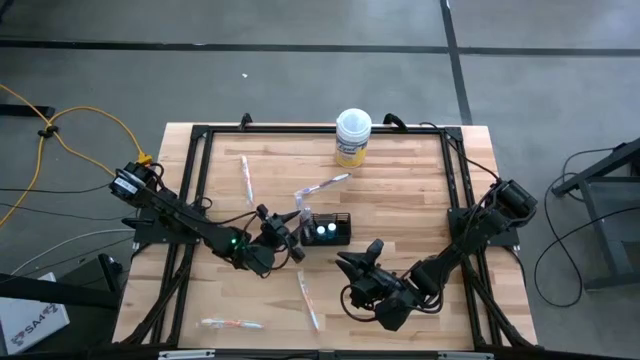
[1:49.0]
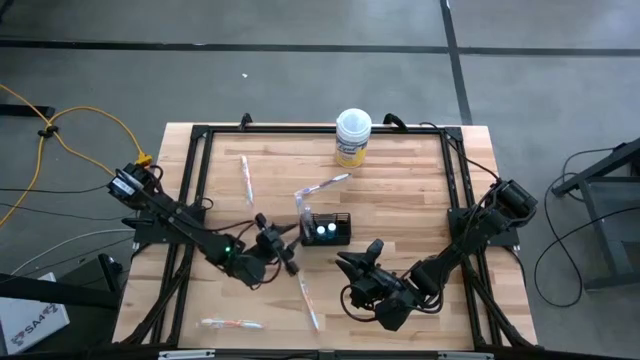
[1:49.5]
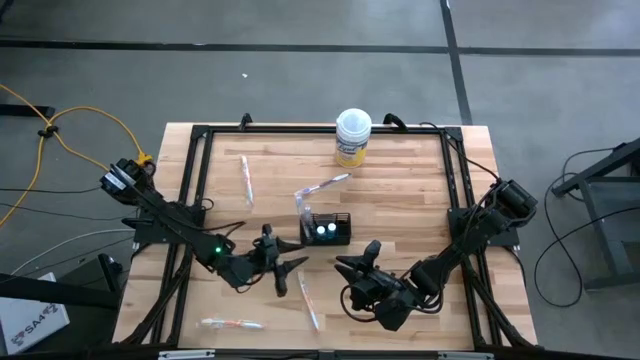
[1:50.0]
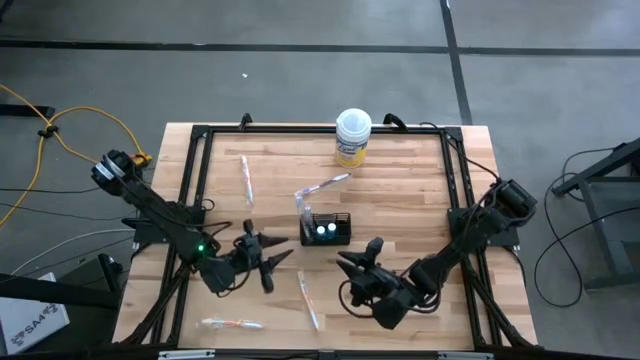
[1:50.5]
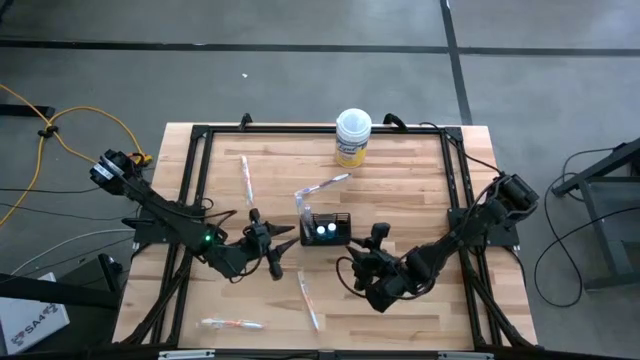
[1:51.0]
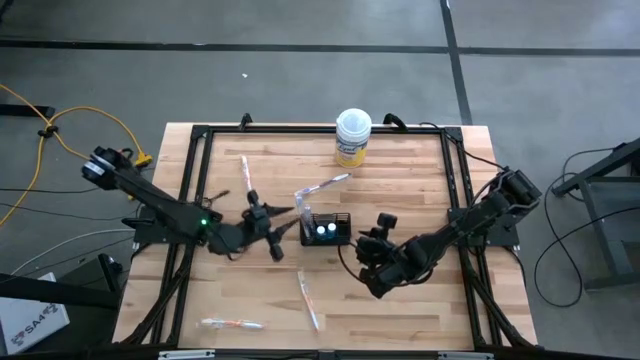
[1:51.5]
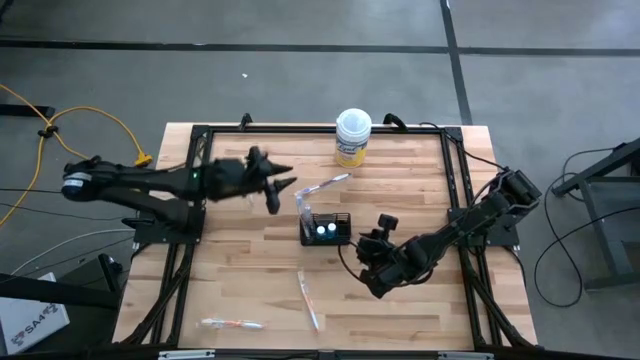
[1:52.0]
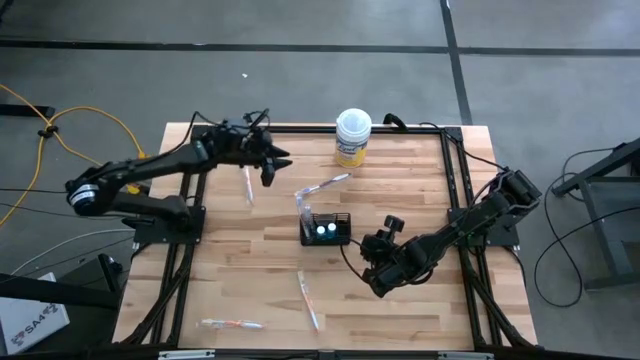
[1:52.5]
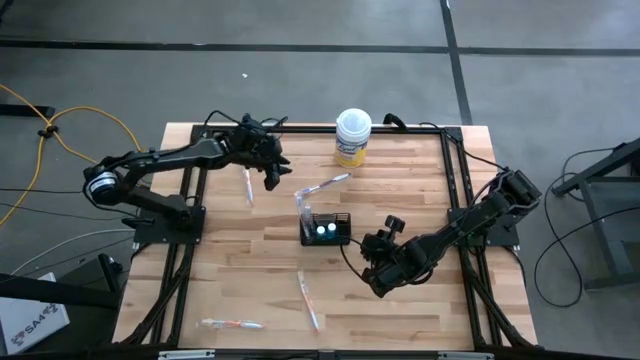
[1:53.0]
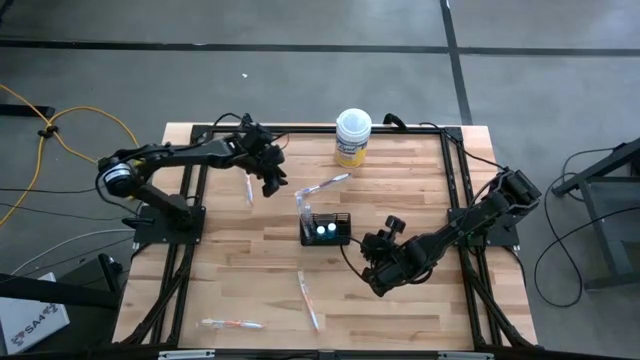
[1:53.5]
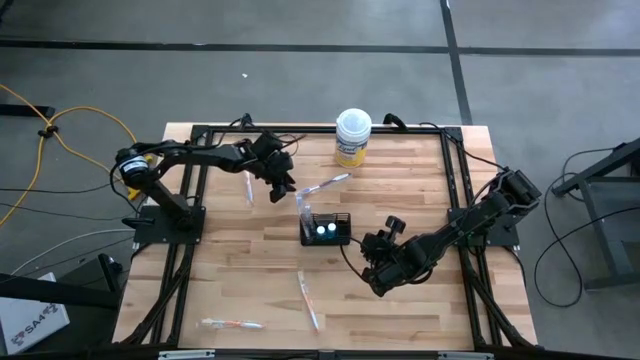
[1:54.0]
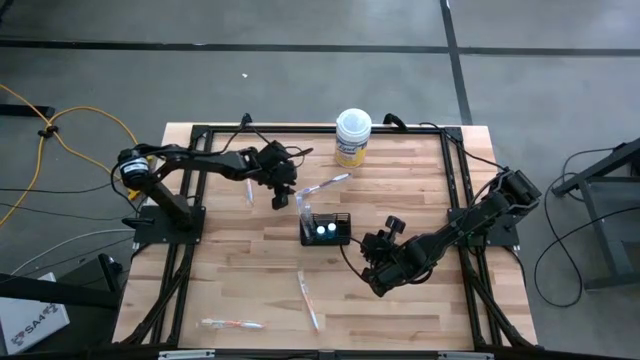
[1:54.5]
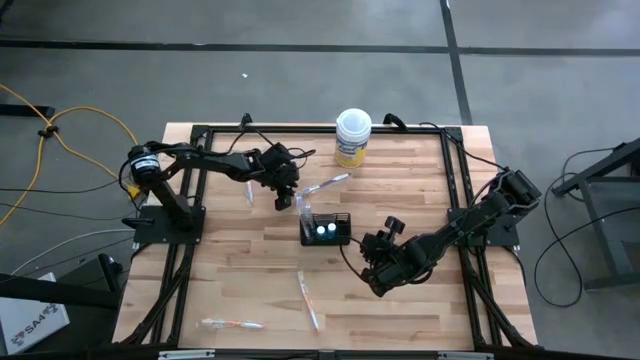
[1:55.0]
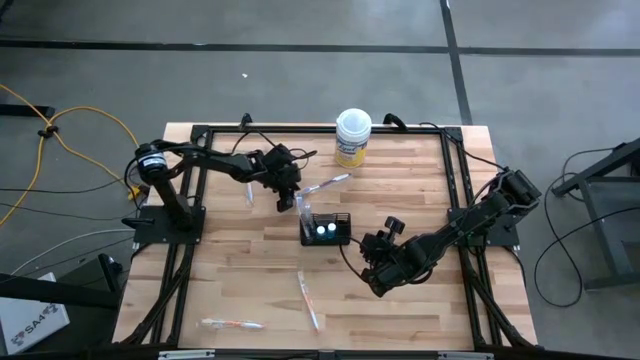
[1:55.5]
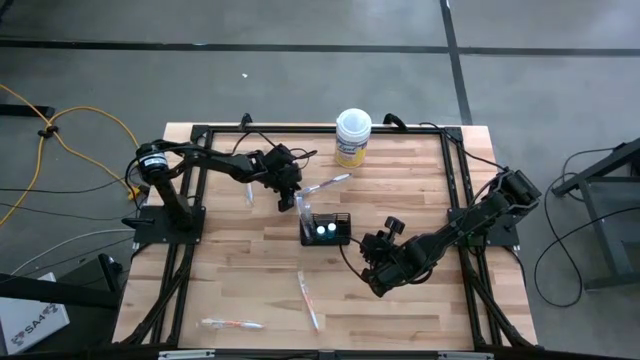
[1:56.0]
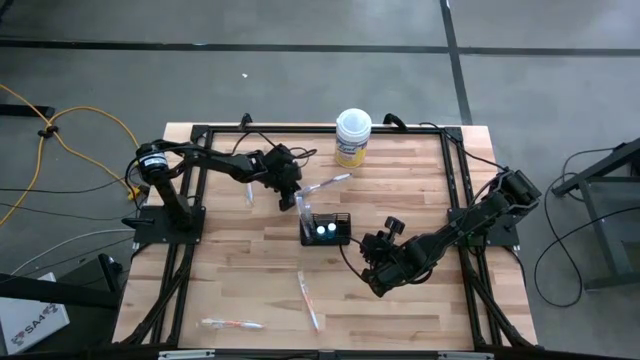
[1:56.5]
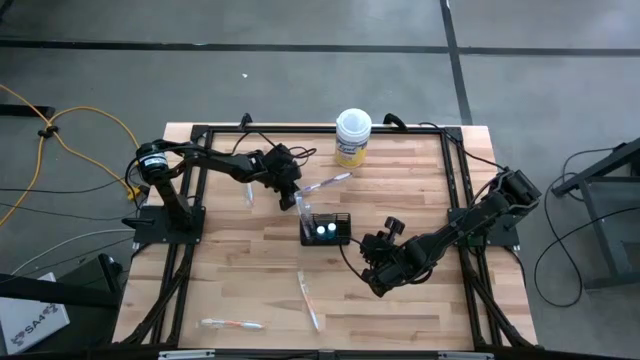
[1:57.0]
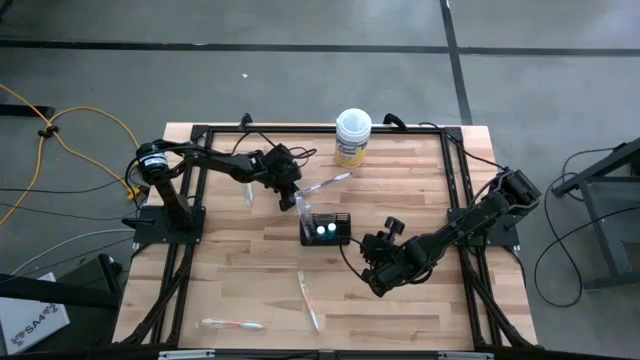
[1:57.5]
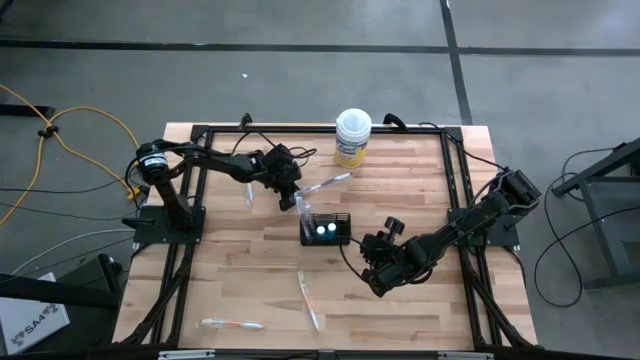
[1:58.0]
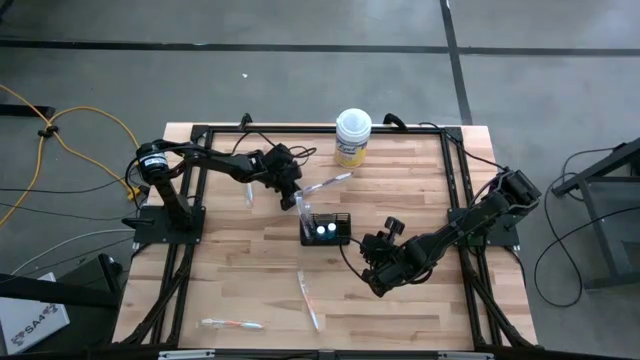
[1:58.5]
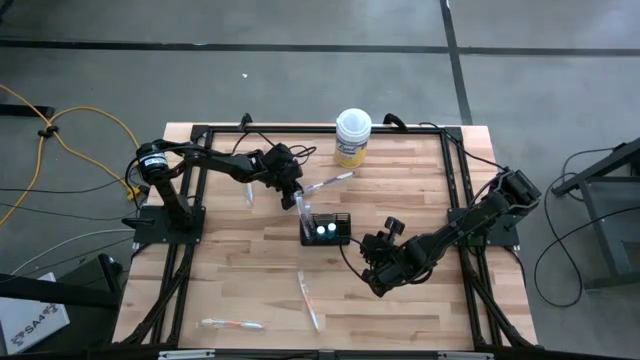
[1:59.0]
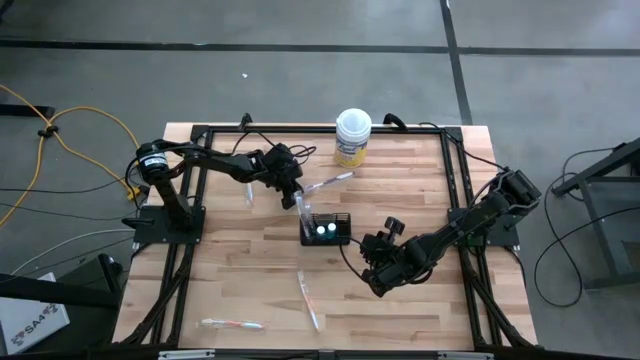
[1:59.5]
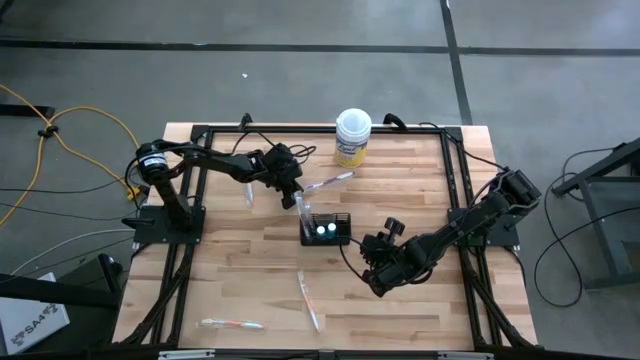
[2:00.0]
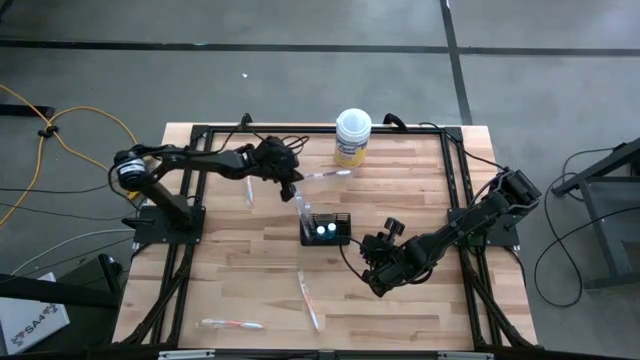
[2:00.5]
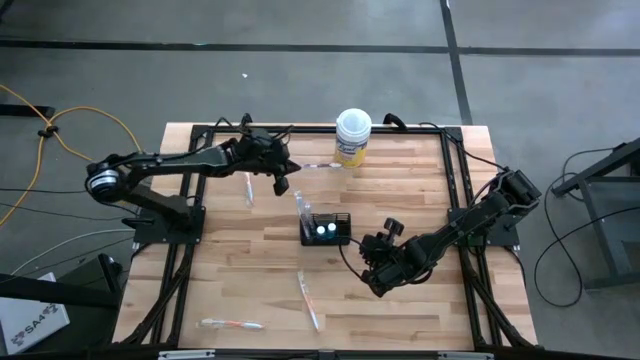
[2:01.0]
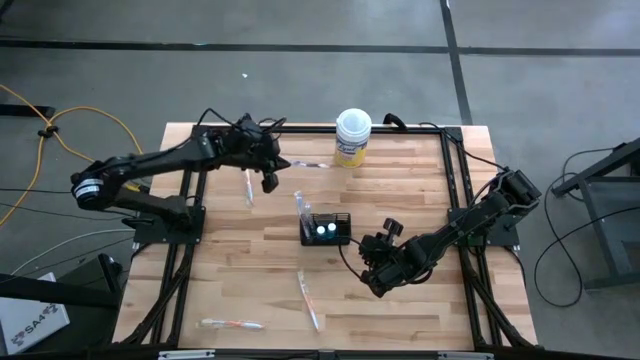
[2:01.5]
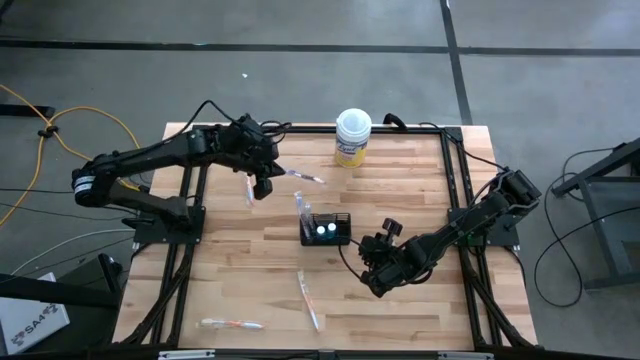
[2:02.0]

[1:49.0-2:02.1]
Task: Pick & Place toothbrushing station
Put the purple toothbrush into the wire organizer

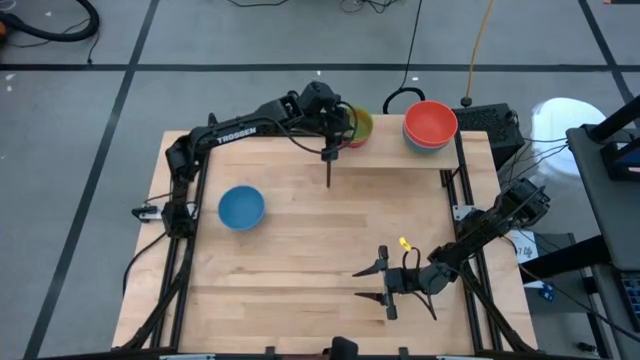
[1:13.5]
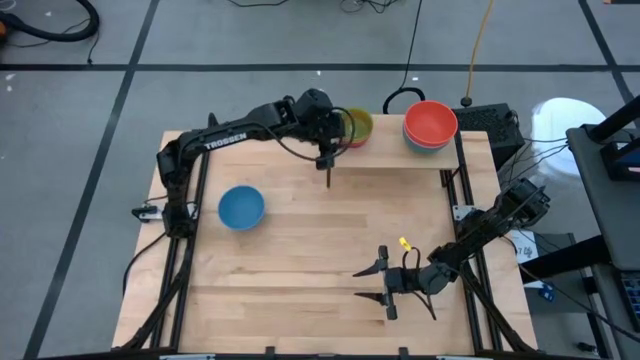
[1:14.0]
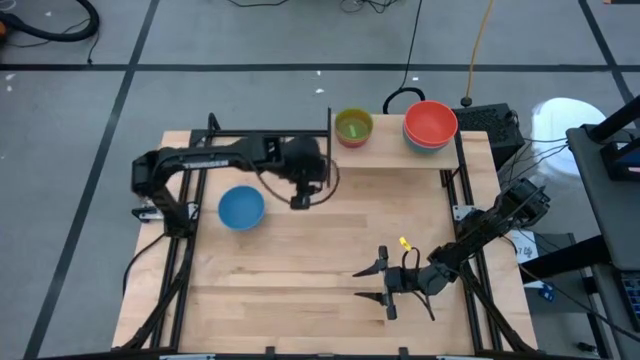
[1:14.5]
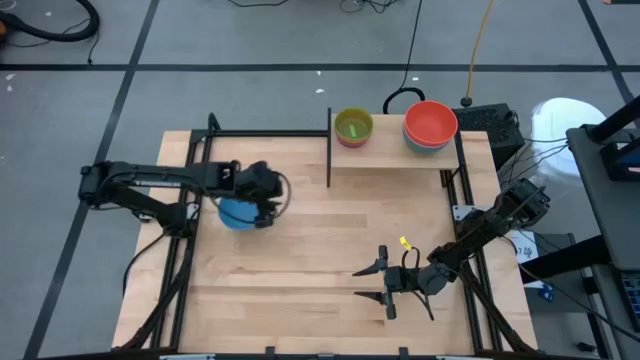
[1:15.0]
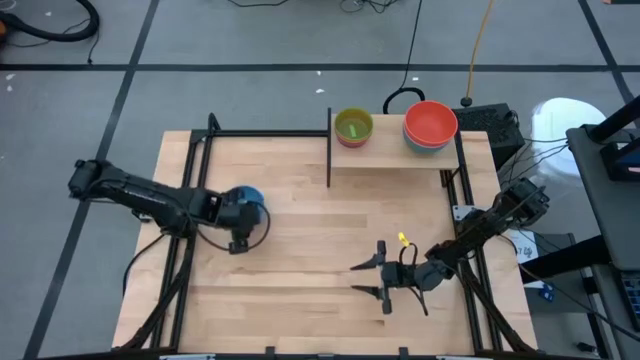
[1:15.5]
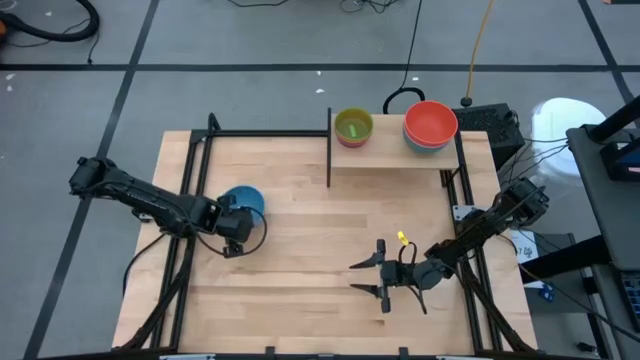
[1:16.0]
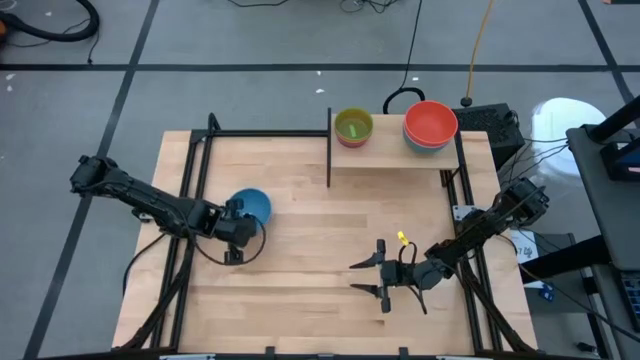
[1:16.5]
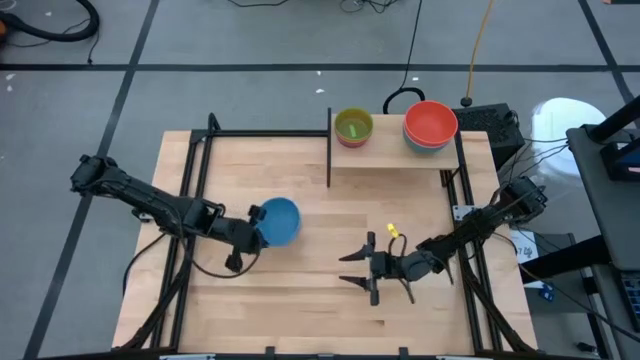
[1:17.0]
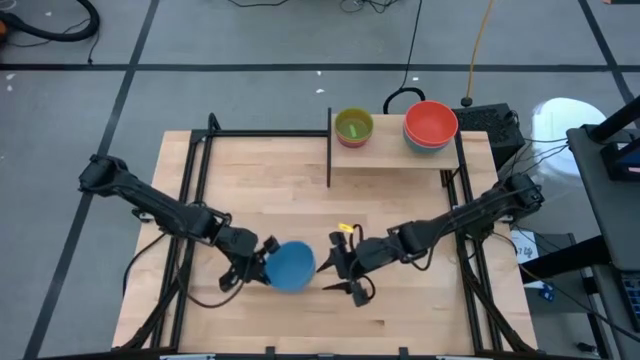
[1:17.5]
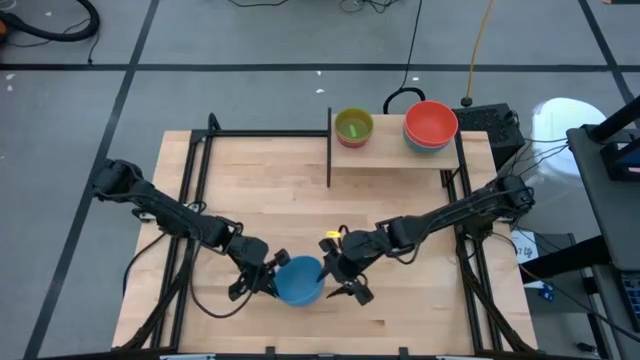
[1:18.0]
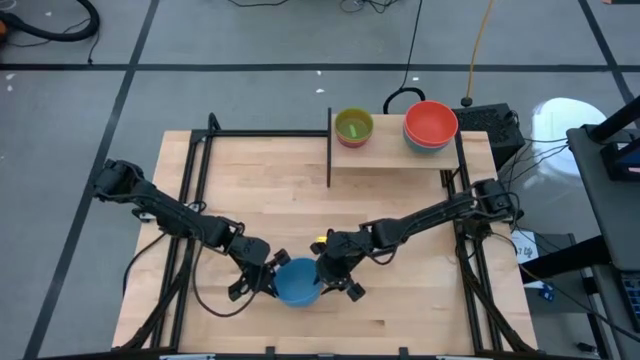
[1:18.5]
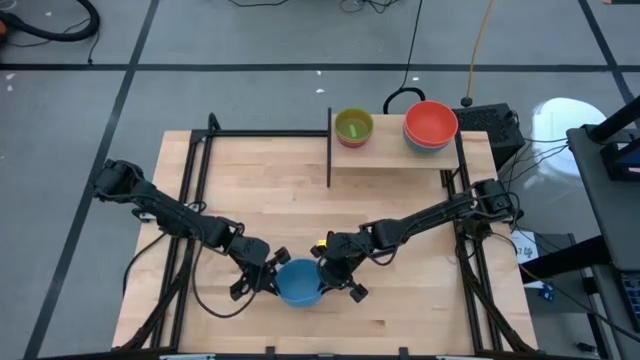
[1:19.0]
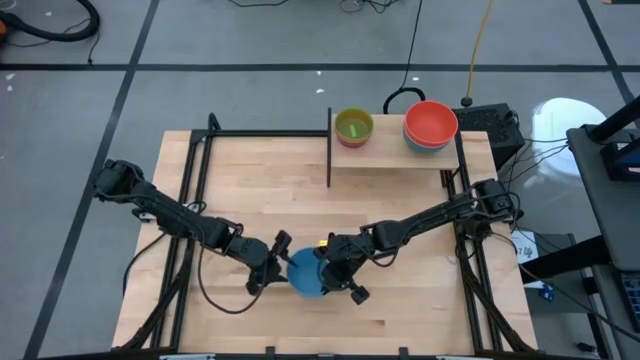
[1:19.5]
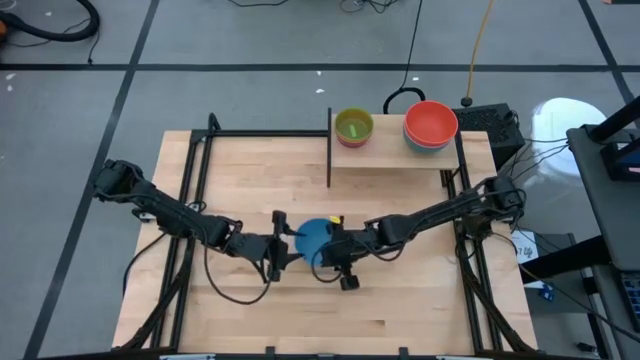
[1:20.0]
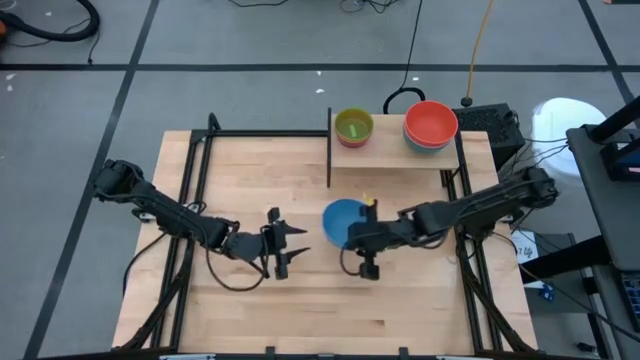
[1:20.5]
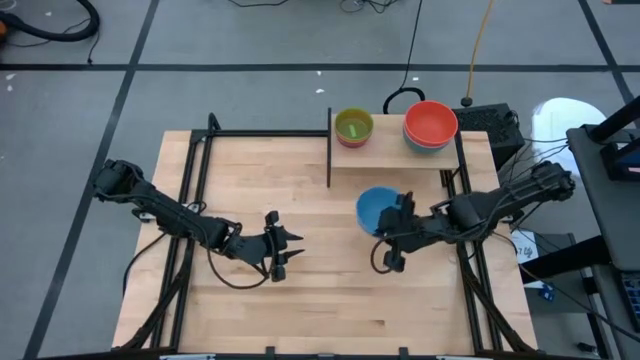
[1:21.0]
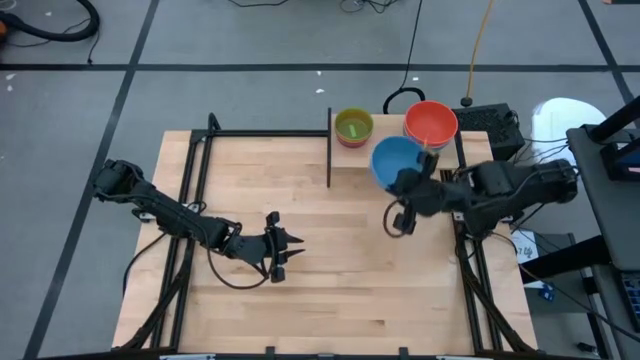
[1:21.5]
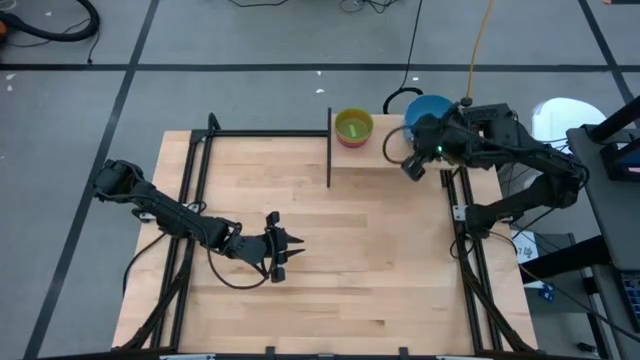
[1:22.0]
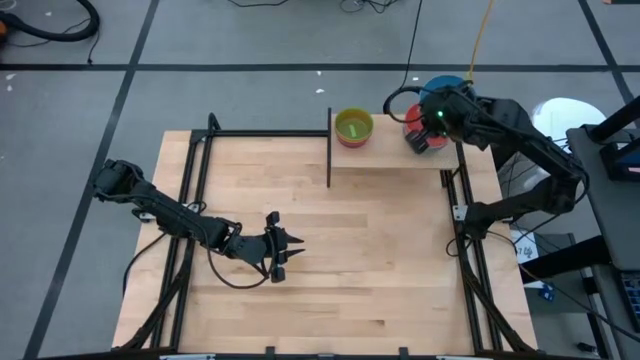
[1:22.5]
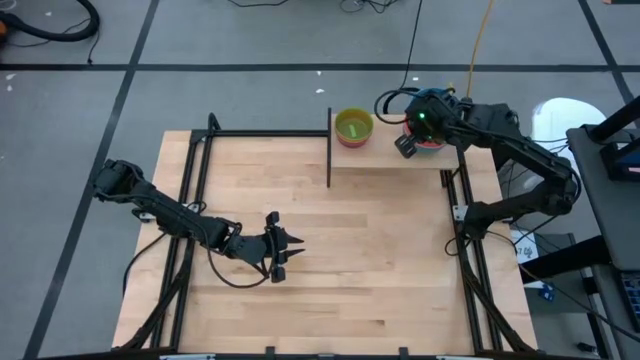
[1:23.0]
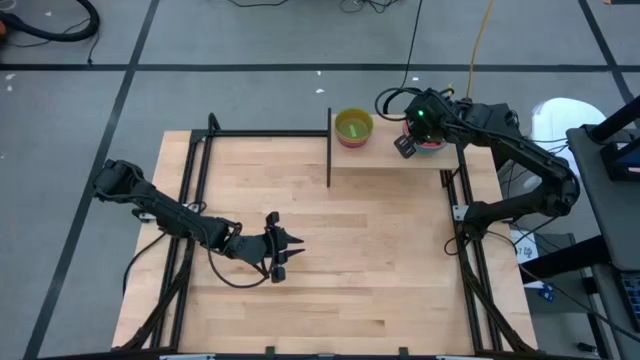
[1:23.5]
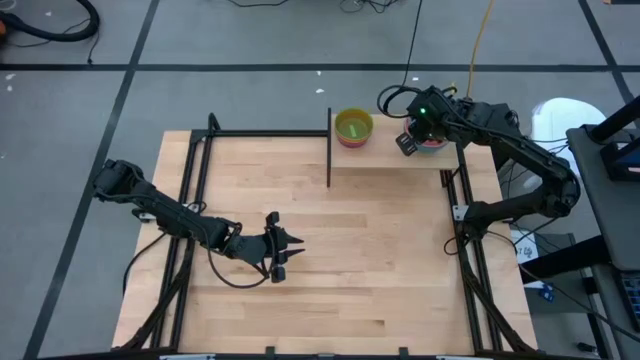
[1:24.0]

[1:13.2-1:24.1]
Task: Place and stack bowls onto a shelf
Stack the large blue bowl on top of the large orange bowl on the shelf
